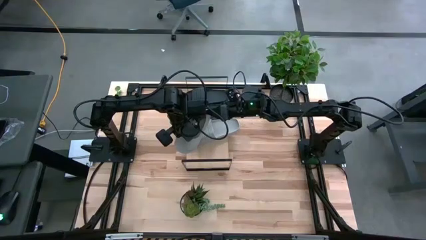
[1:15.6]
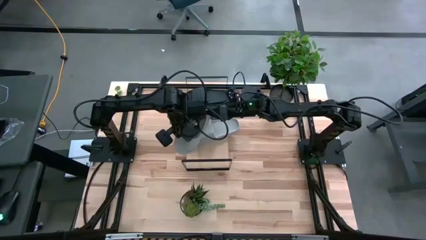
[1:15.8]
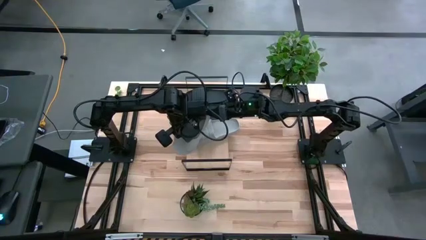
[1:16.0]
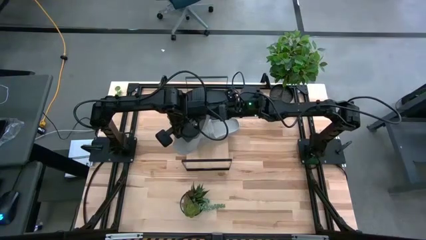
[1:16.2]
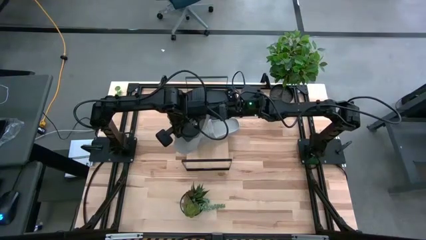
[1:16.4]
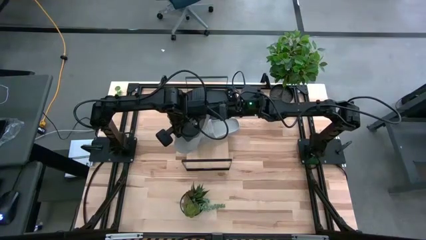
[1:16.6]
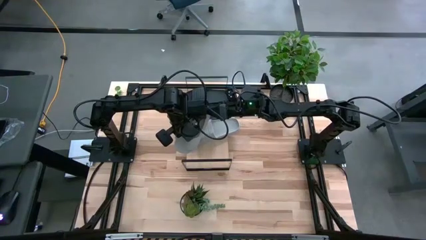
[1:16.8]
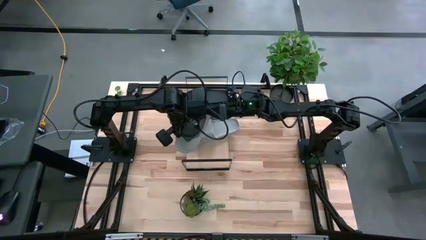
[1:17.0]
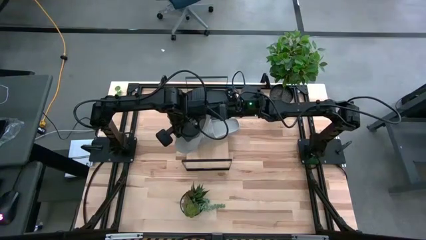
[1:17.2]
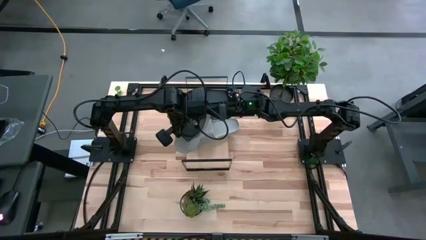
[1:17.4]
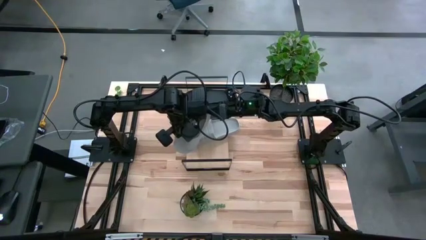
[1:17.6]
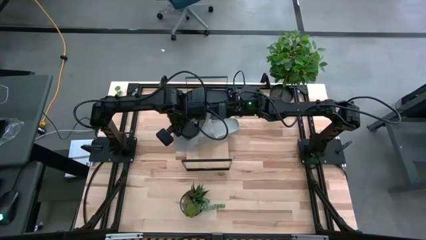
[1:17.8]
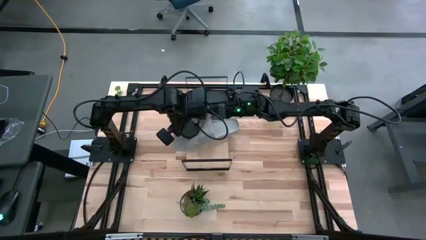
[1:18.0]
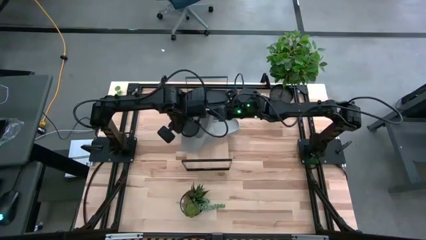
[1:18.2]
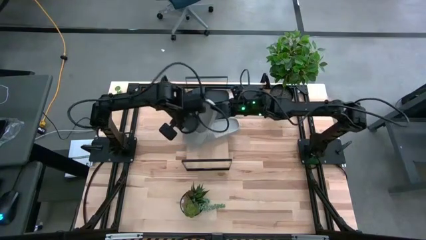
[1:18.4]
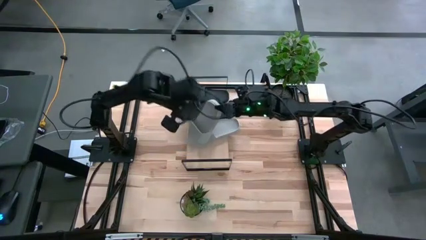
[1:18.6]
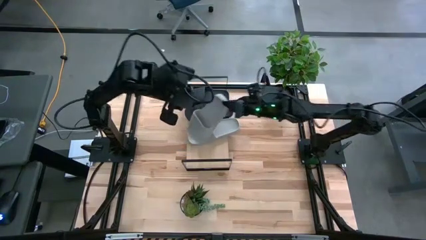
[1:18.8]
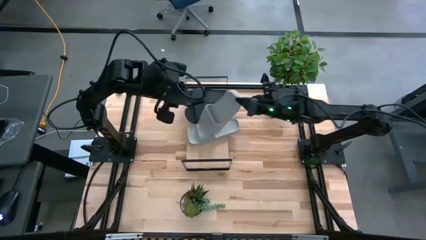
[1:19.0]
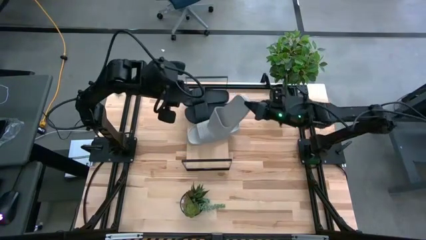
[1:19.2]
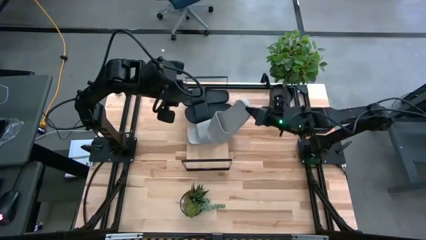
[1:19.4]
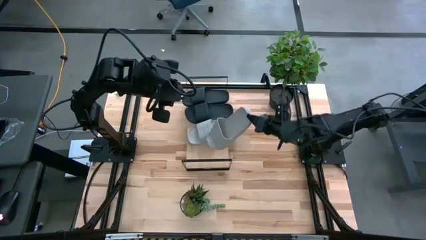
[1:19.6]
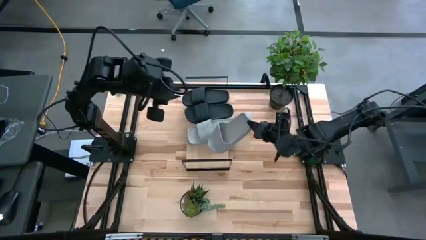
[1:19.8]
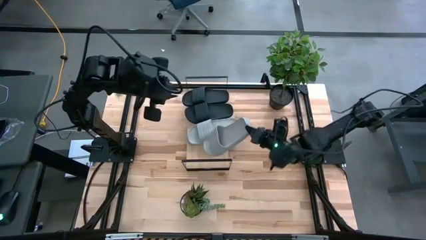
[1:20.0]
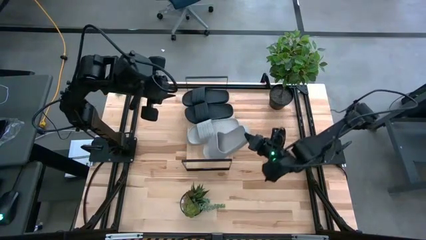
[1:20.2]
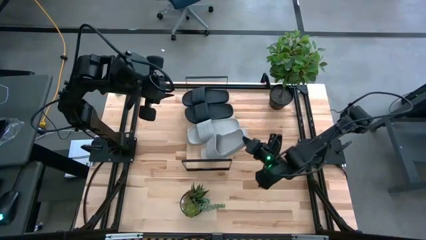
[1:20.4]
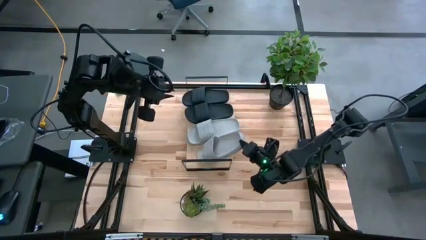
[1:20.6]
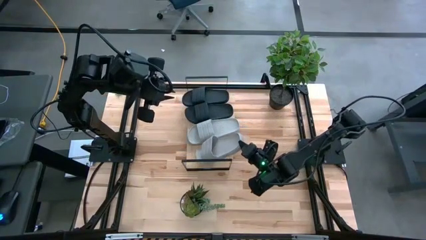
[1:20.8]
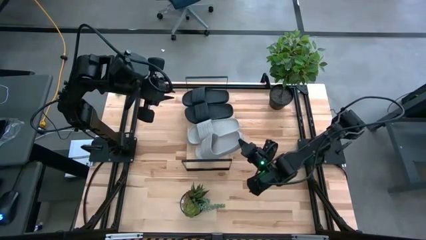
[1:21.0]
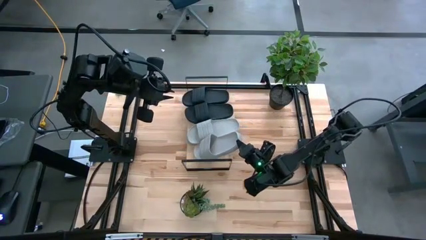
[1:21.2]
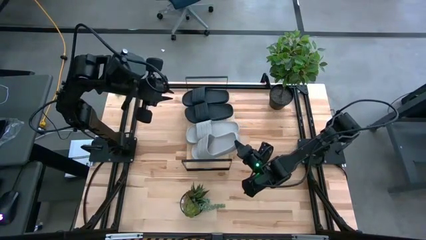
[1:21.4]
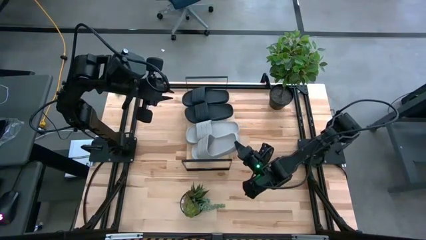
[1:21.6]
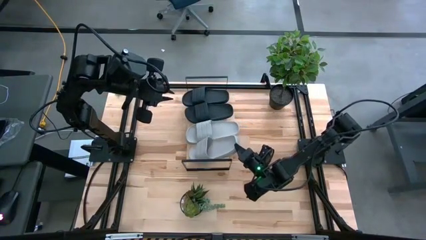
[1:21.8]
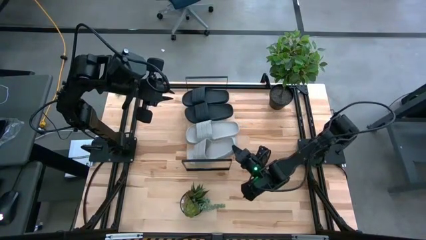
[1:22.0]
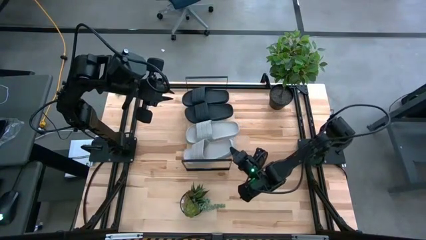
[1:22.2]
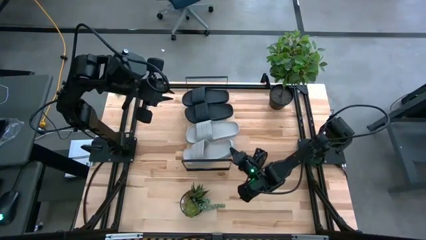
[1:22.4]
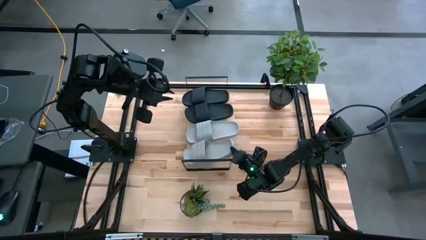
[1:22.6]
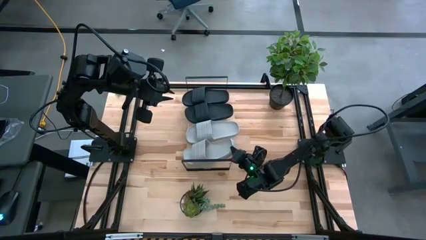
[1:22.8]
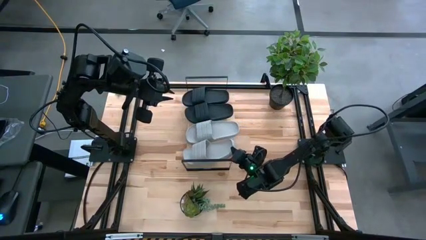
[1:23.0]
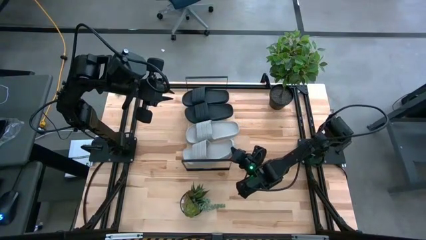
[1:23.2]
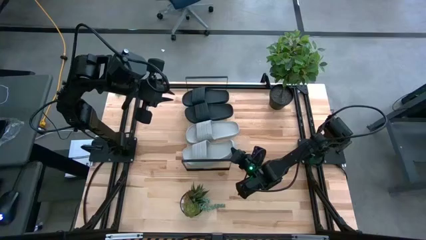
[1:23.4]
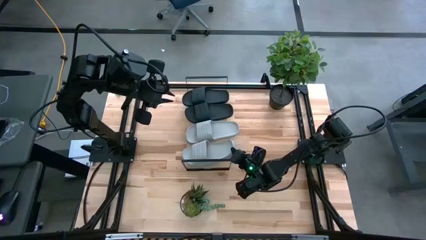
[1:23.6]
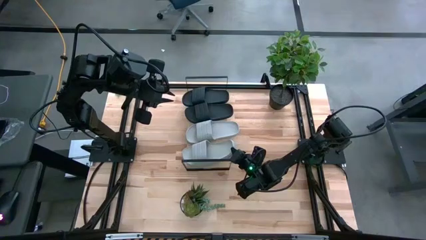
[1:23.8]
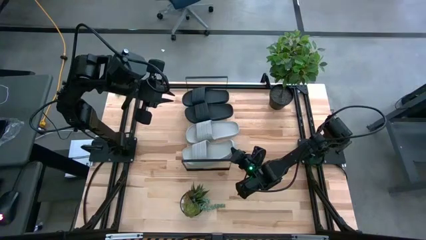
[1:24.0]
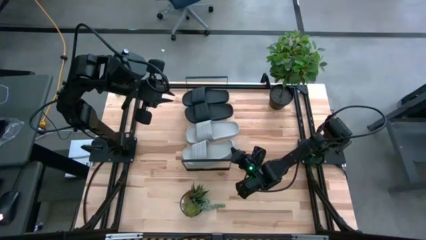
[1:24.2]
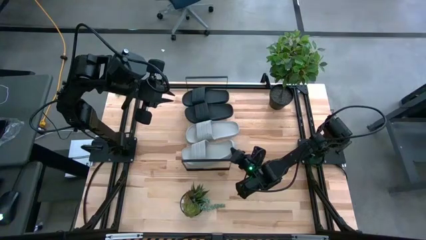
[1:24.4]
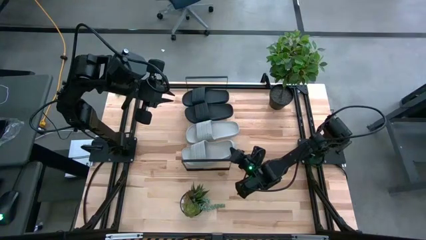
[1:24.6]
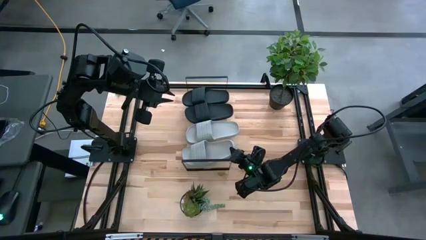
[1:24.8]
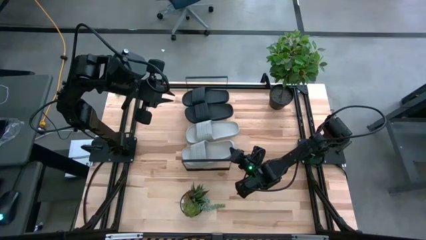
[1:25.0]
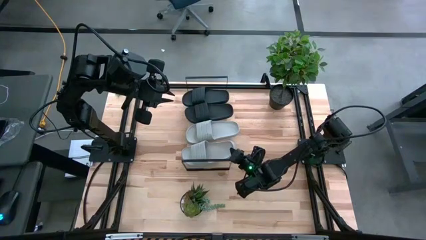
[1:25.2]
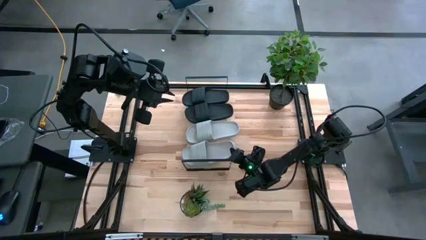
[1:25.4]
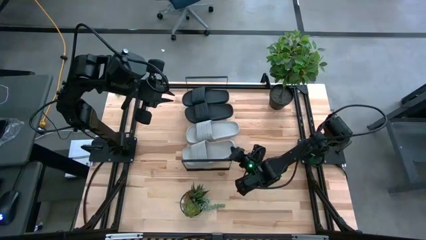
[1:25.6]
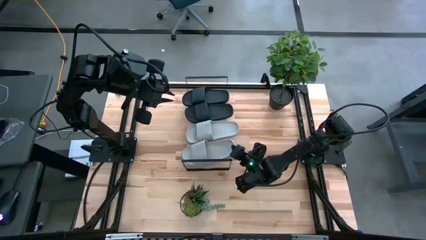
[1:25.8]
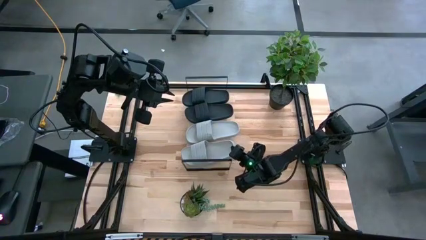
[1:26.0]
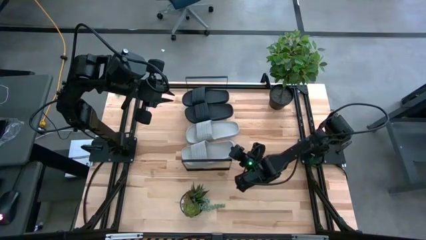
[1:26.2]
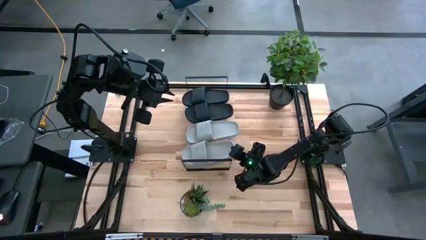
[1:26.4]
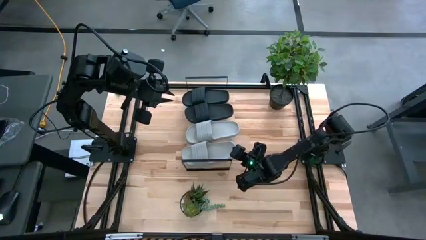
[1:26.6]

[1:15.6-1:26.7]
Task: Pick and place slides into the shelf
Put the gray slipper slide on the shelf

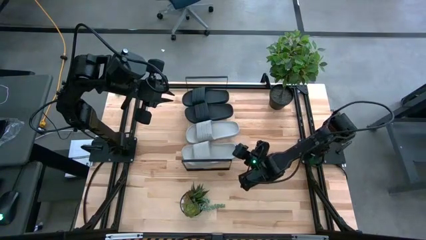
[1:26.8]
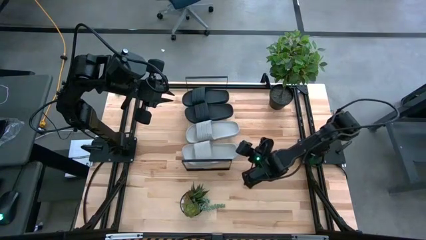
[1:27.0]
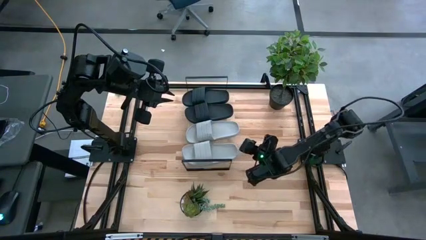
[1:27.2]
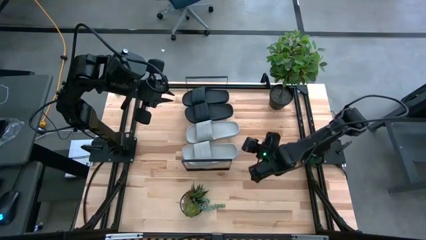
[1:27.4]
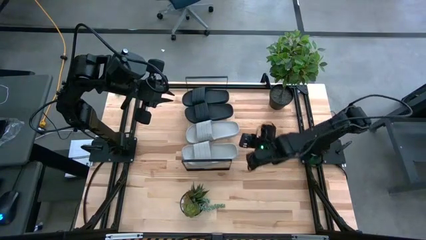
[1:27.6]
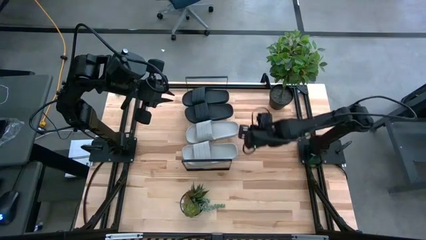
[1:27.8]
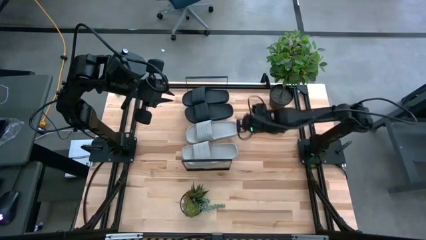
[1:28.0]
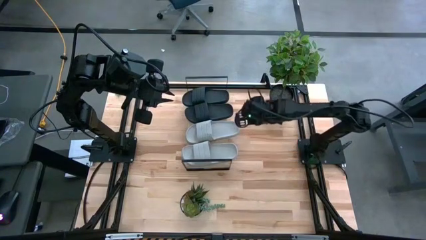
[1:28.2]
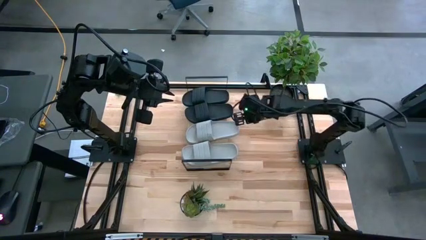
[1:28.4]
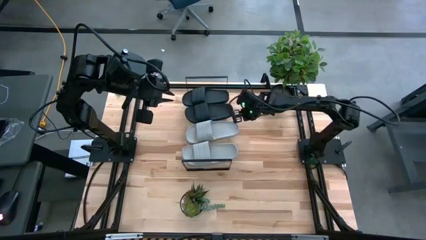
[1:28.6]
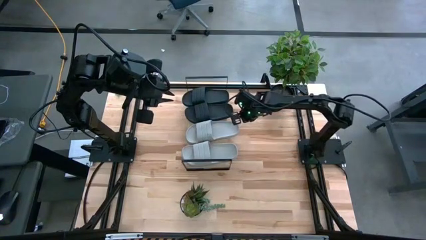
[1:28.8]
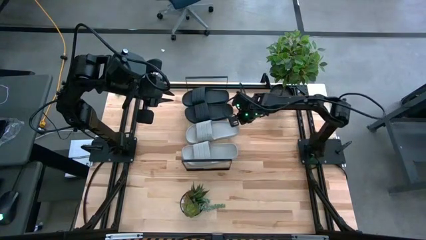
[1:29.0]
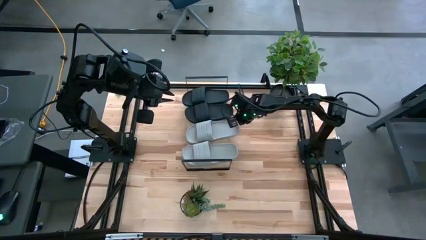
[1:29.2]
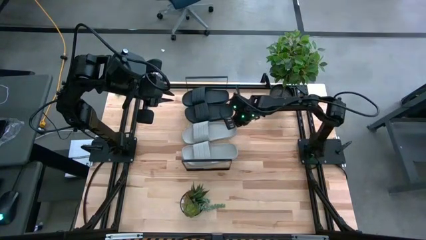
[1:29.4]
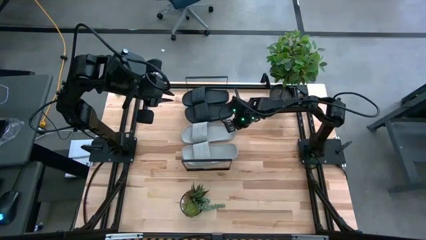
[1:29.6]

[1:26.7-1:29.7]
Adjust the right gray slipper slide on the shelf
